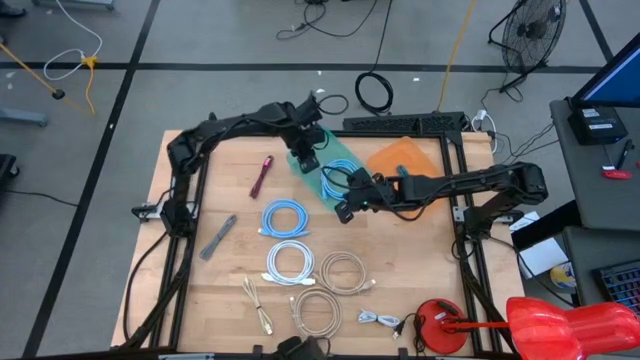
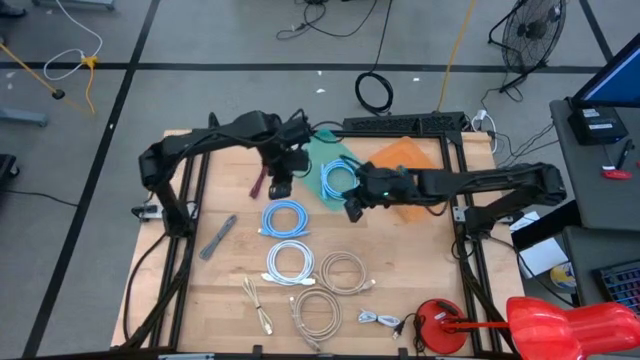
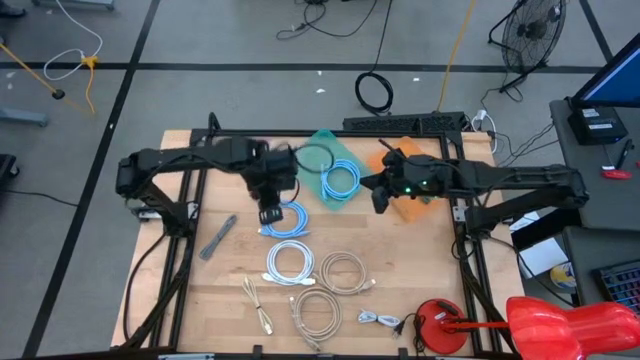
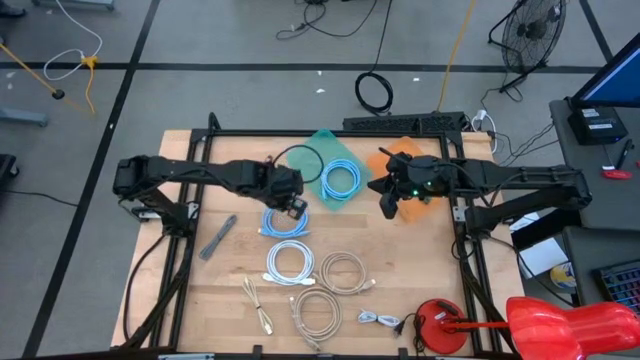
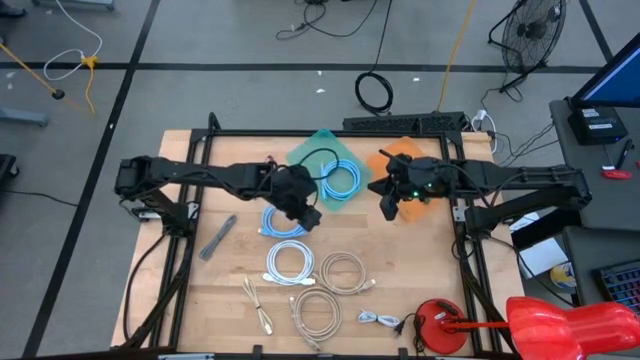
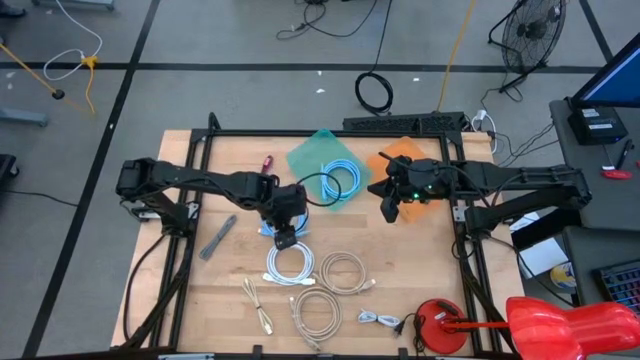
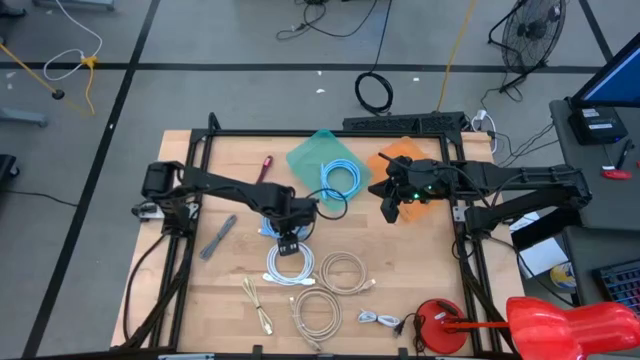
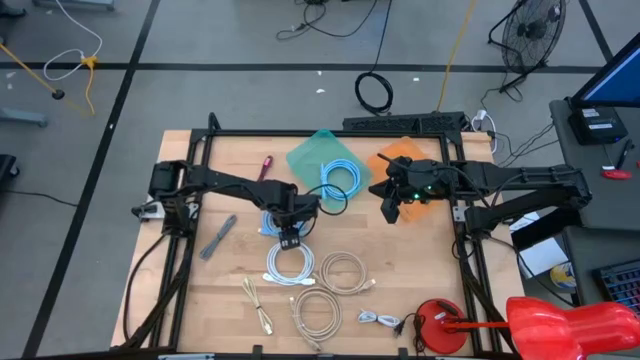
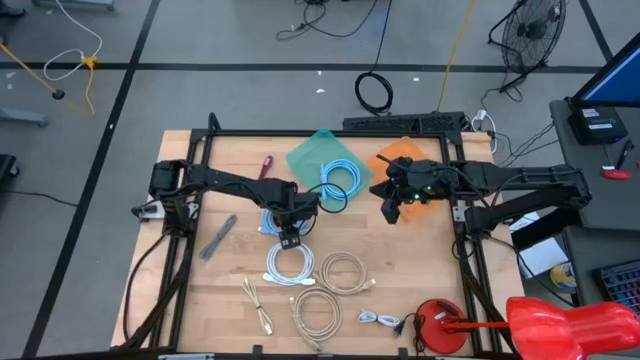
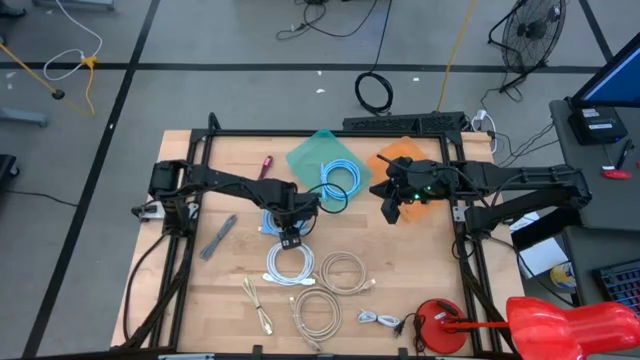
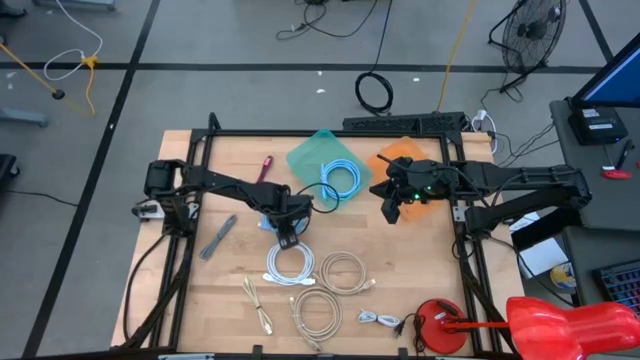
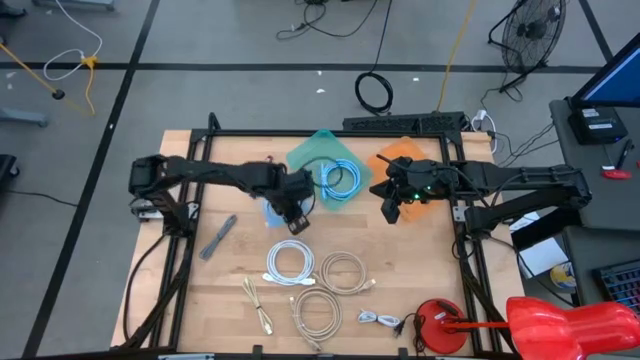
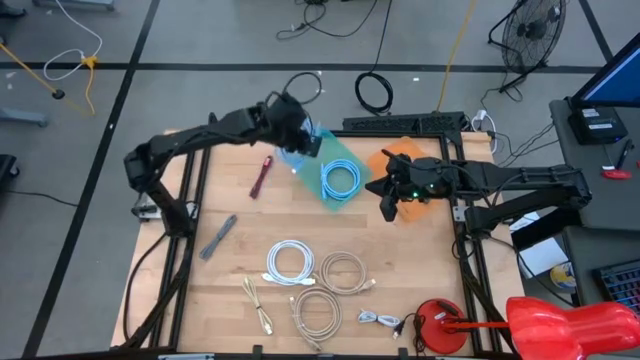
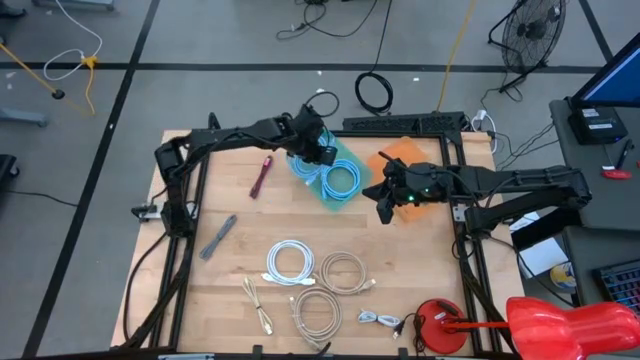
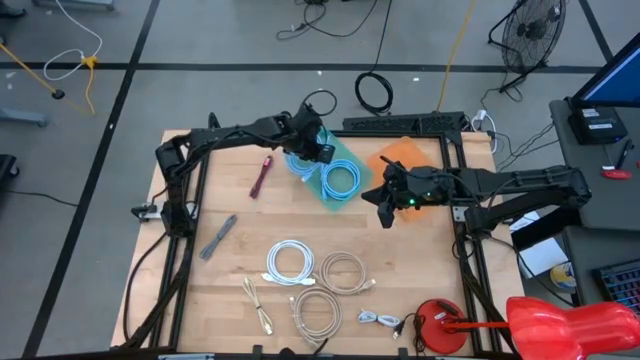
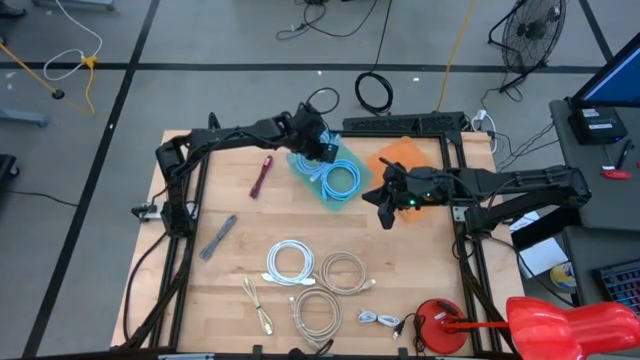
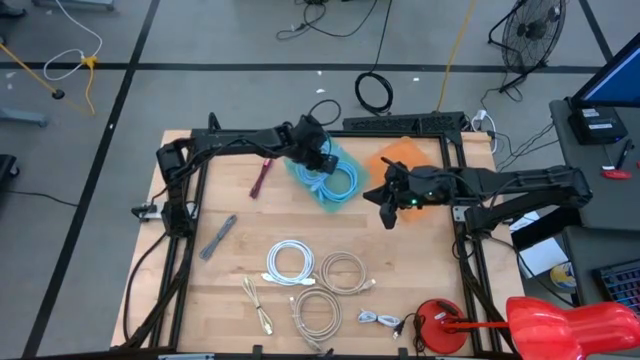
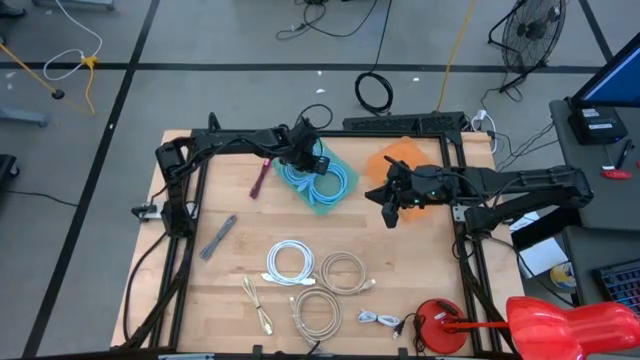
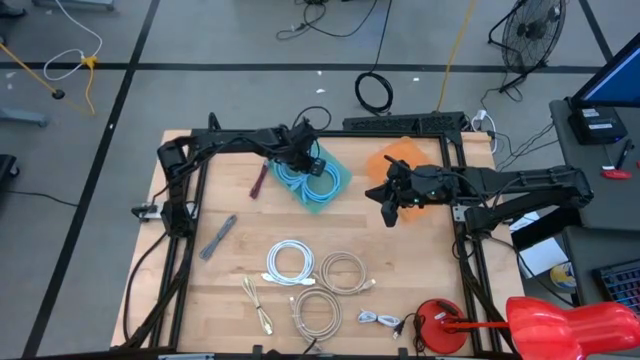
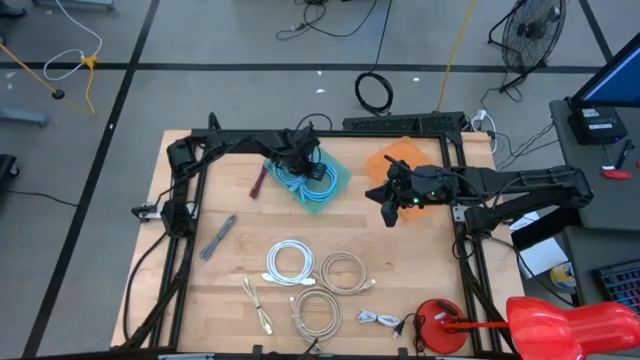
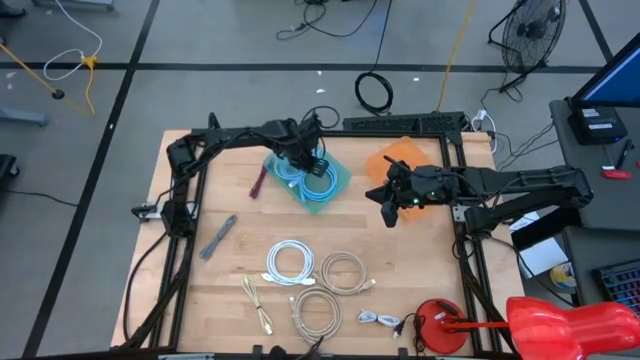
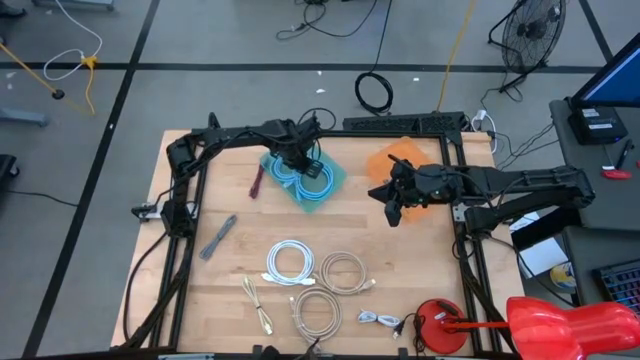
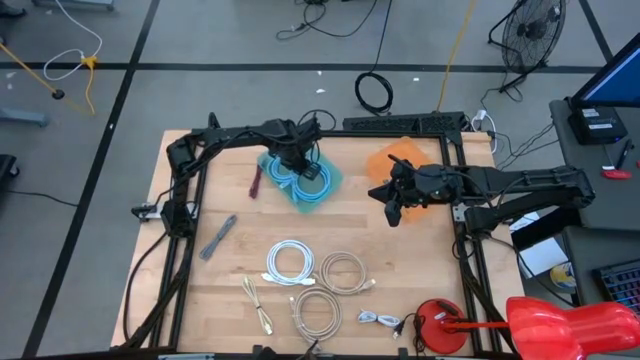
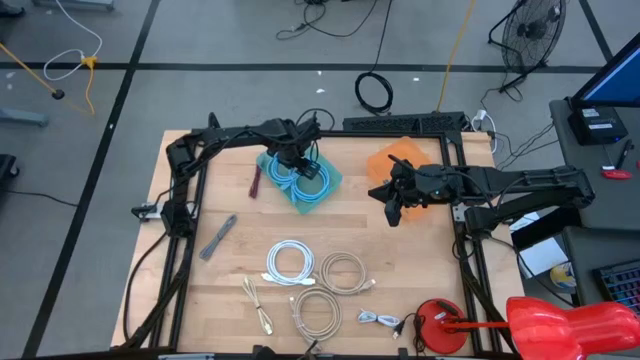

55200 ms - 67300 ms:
Task: Pick & Place USB Port
Put the light blue charger cable into the green bin

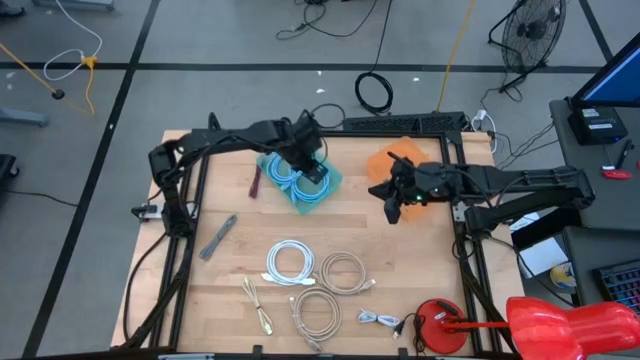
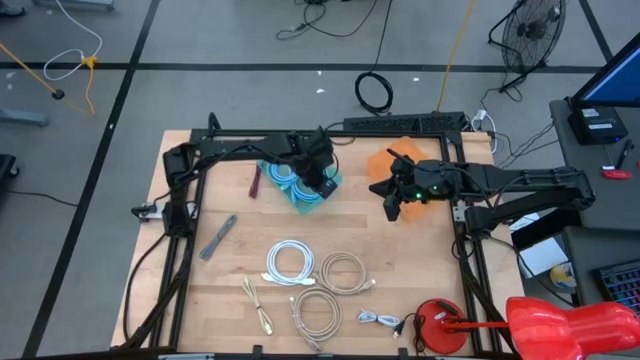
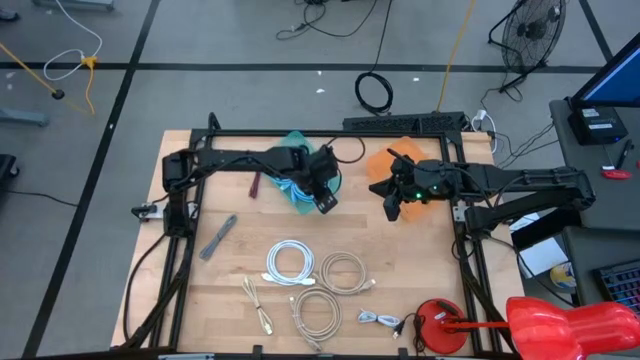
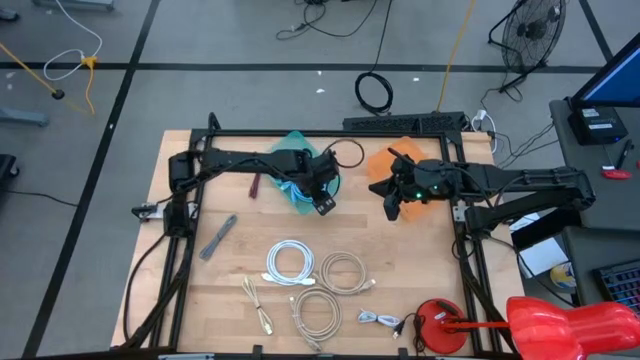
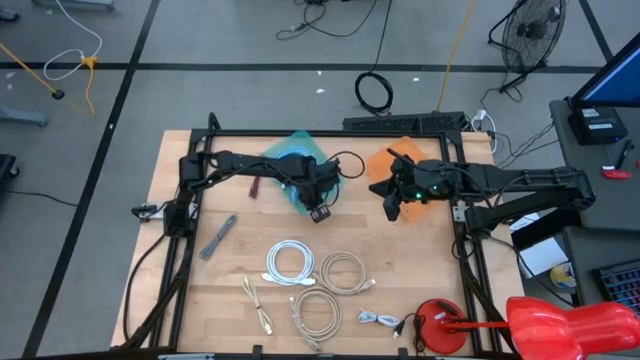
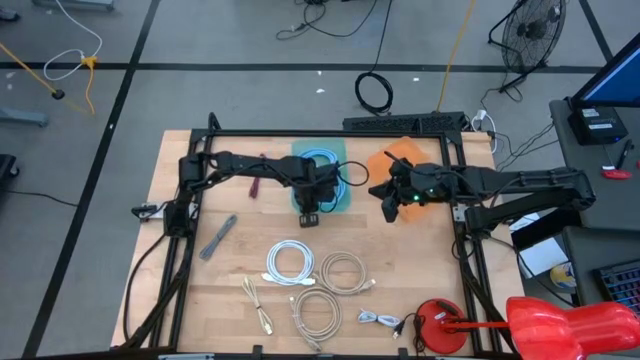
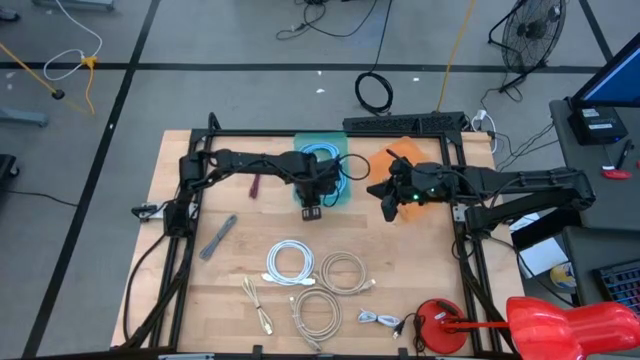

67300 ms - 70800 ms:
Adjust the green bin

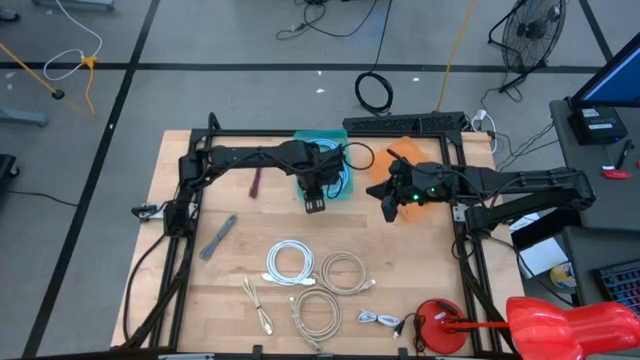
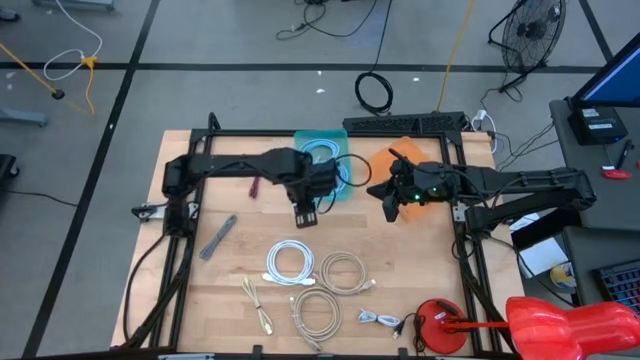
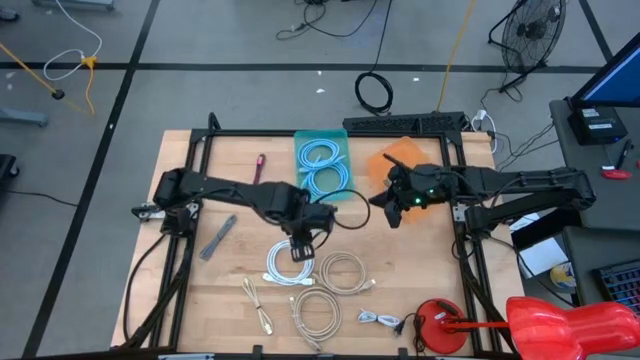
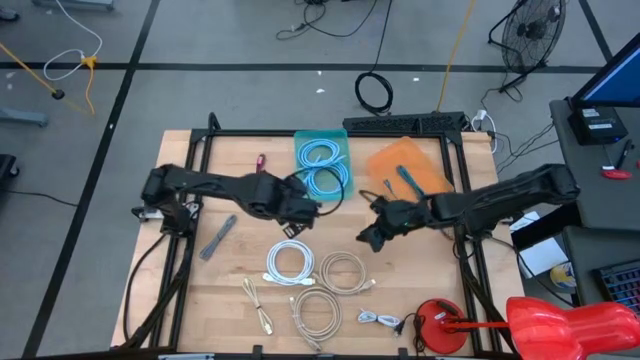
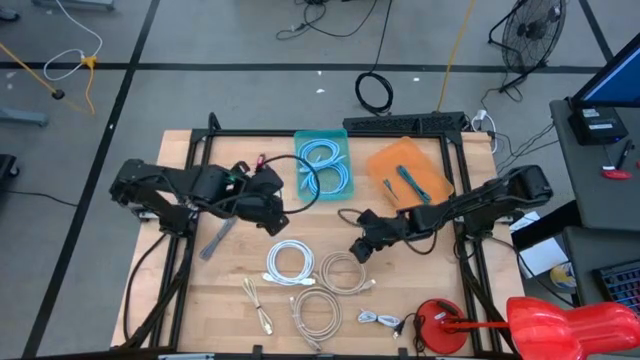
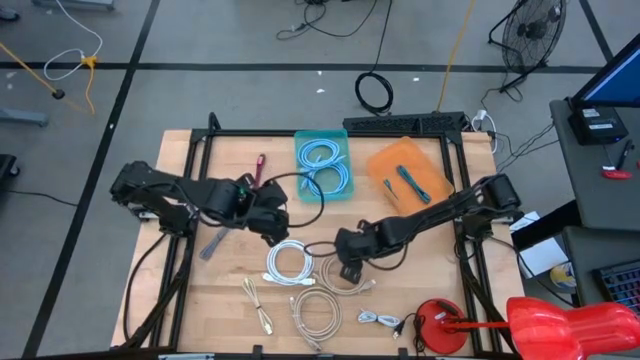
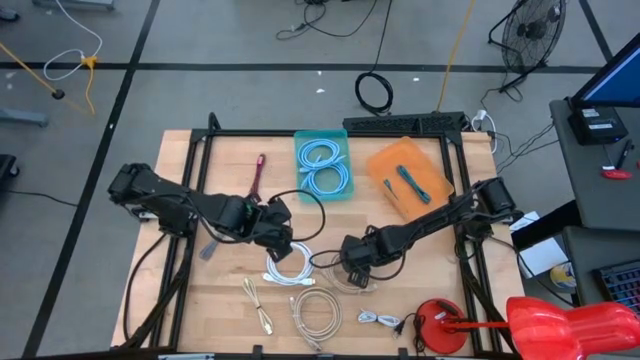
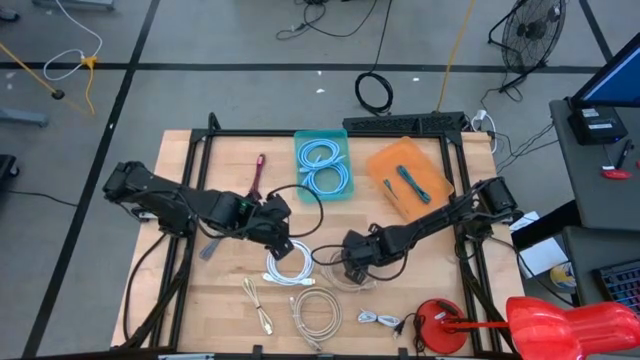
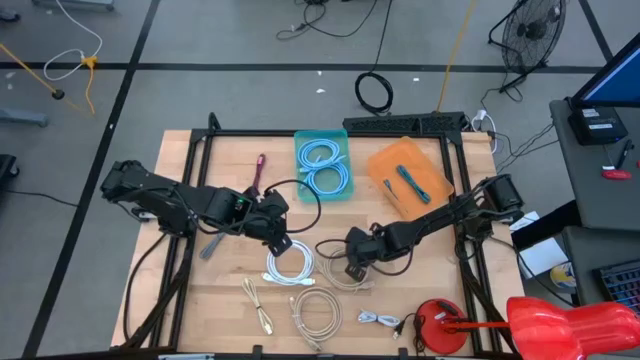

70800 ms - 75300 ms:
Put the top brown charger cable into the green bin

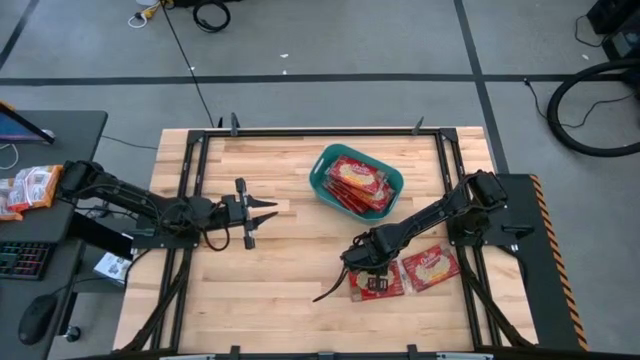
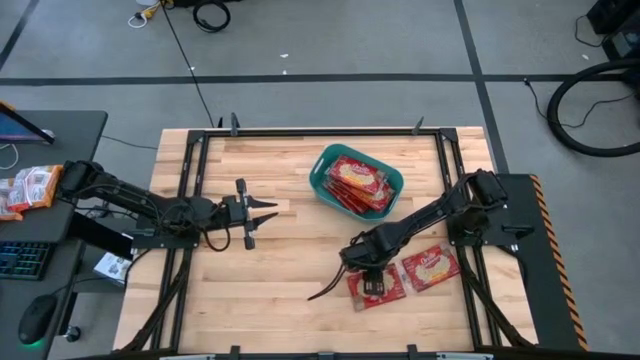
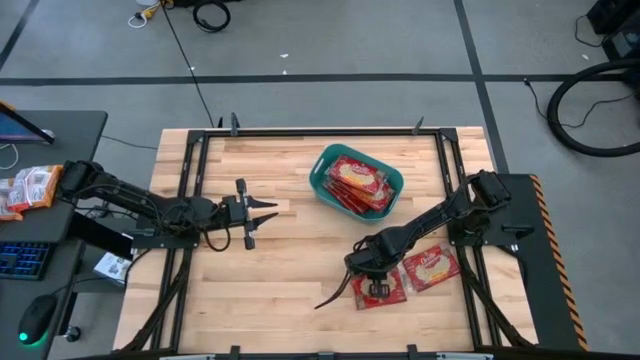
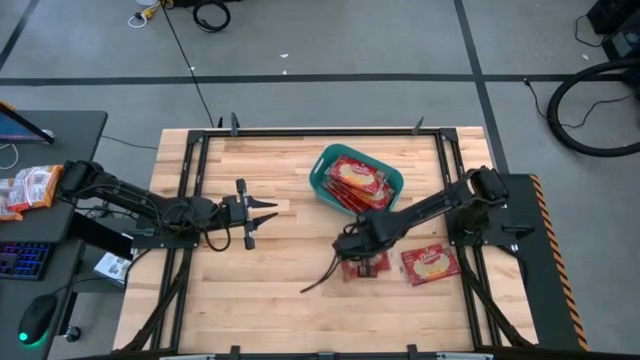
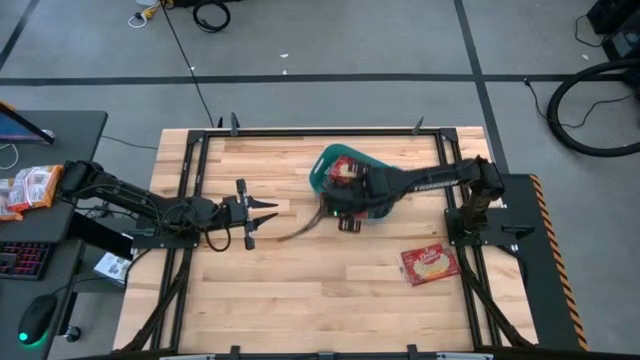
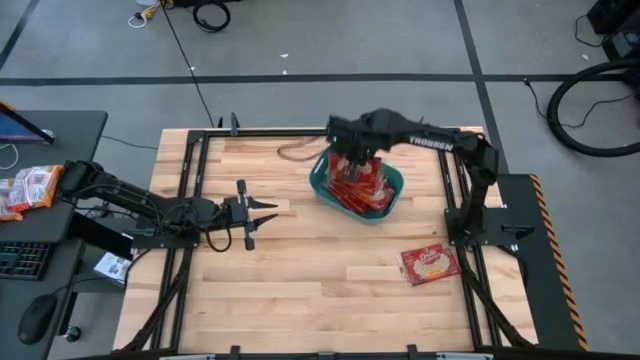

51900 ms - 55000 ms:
Task: Sort popcorn bags into baskets
Put the left red popcorn bag into the green bin
